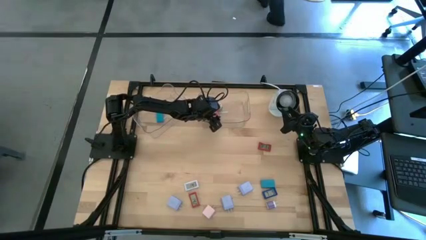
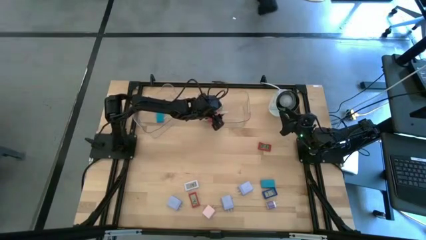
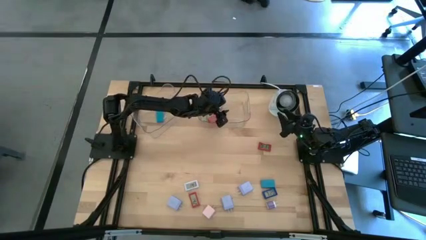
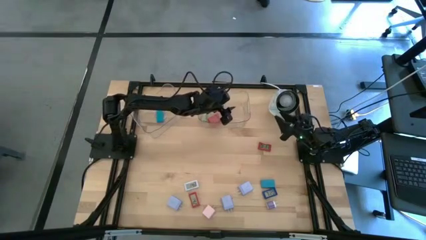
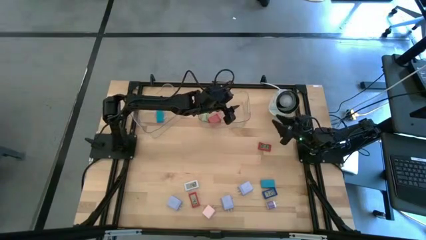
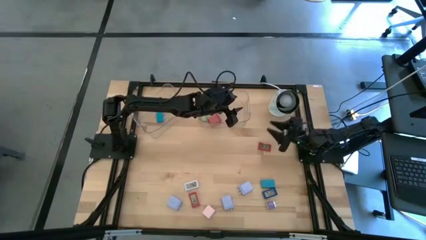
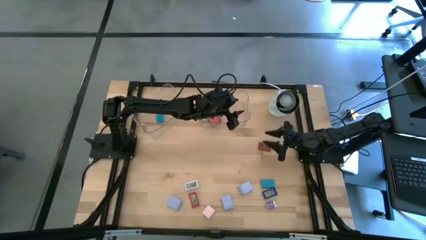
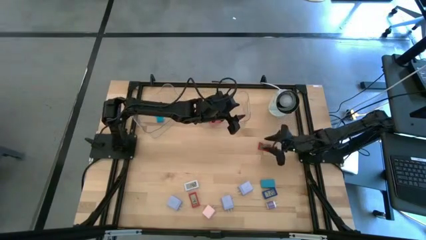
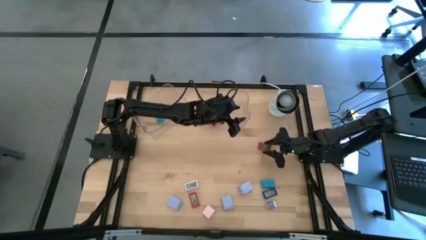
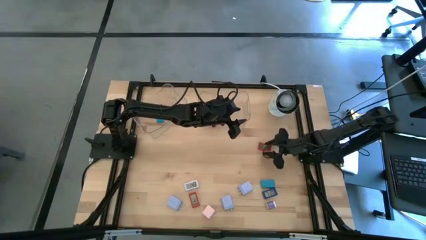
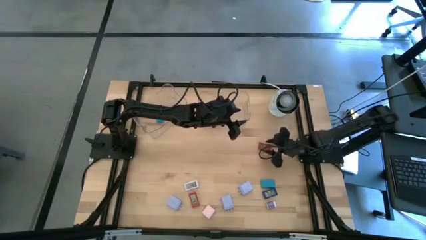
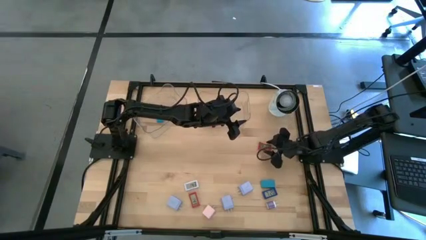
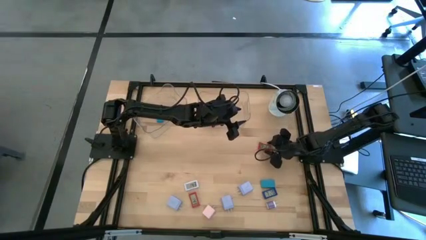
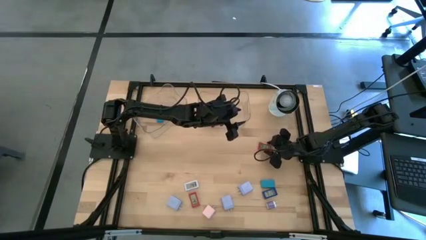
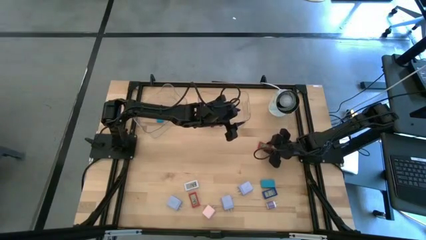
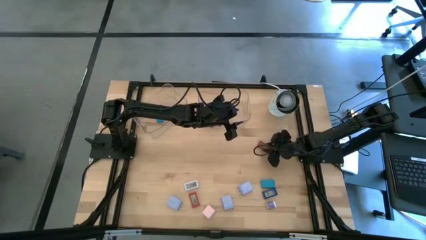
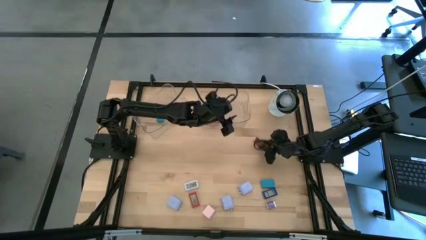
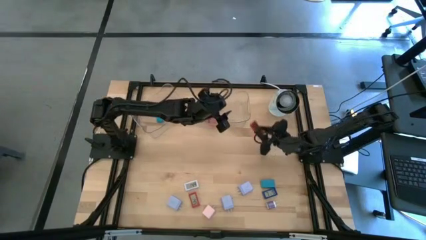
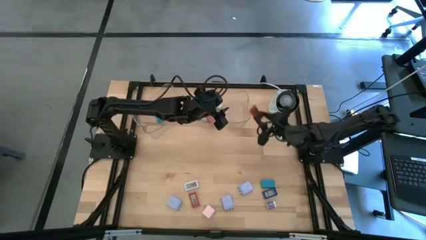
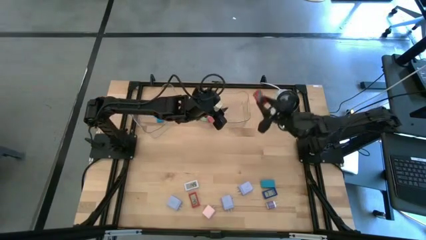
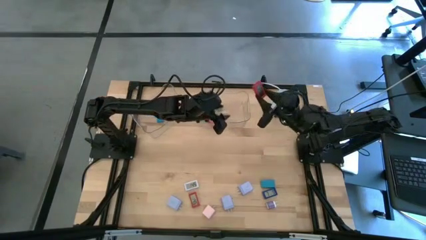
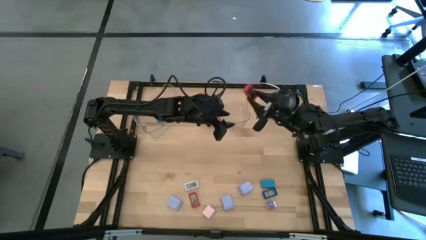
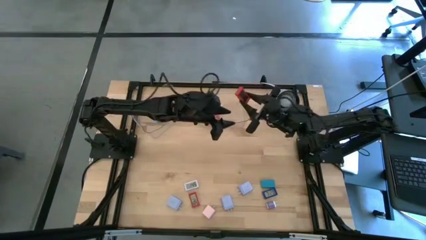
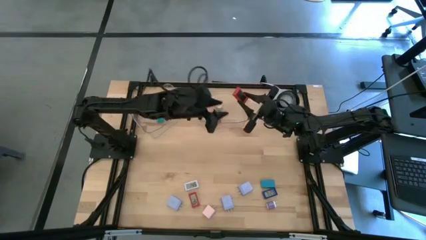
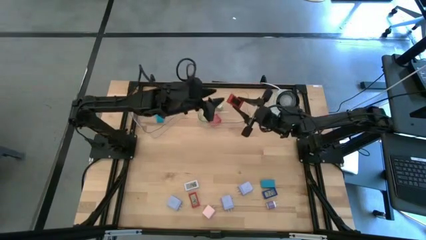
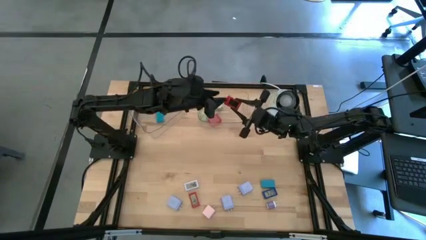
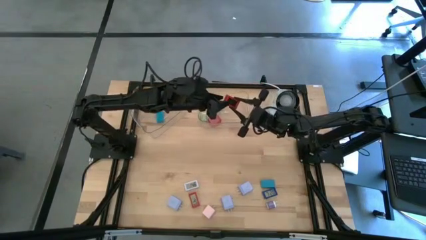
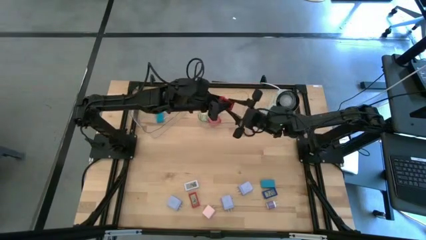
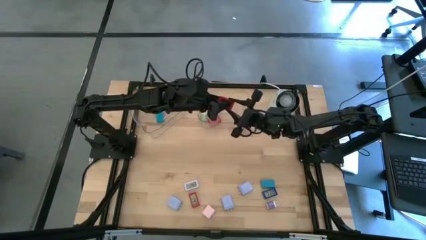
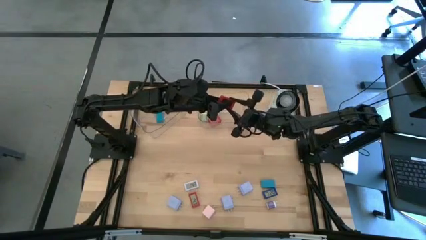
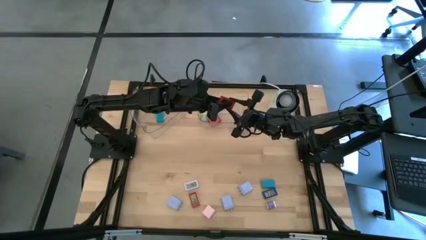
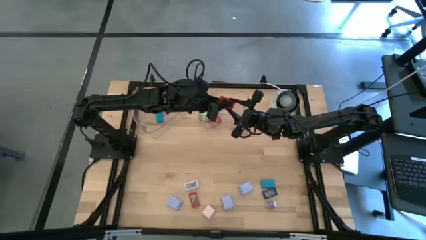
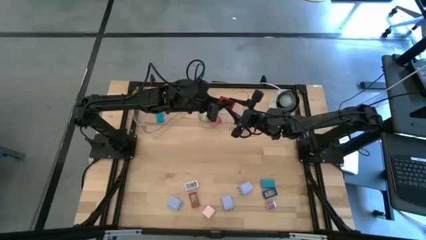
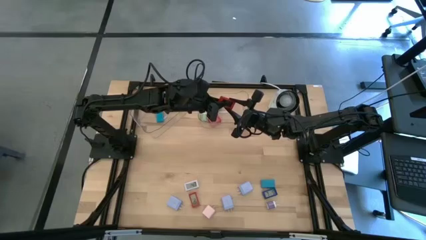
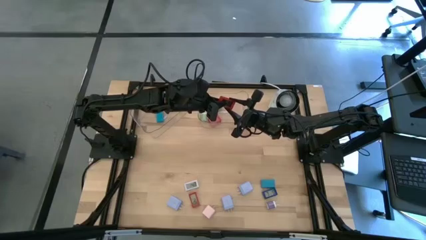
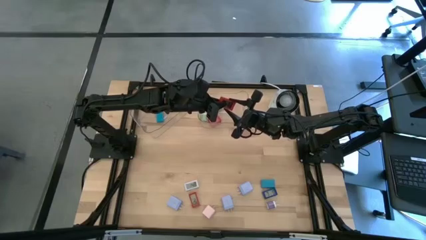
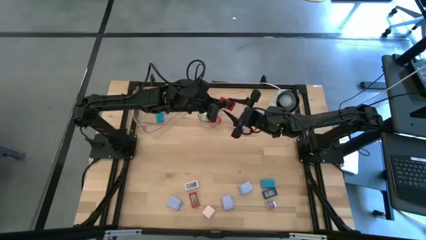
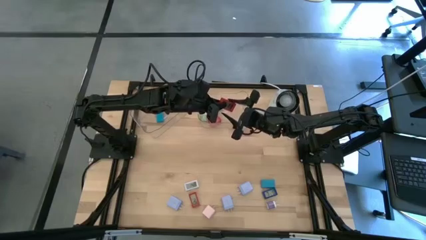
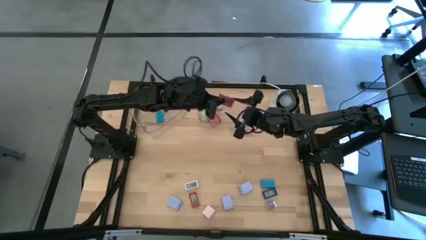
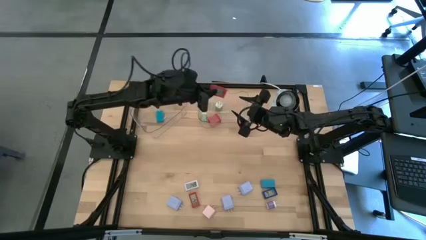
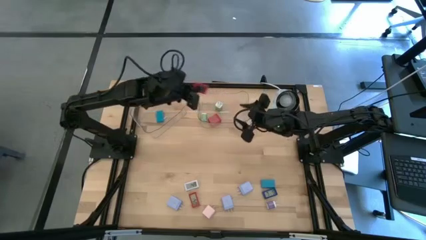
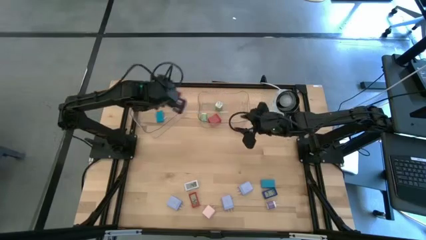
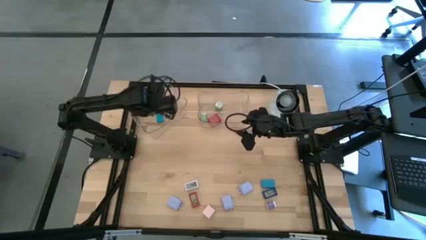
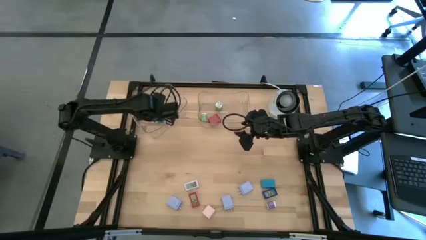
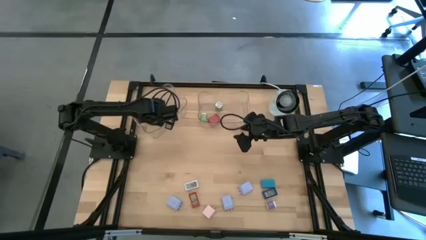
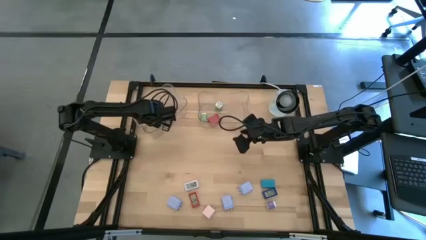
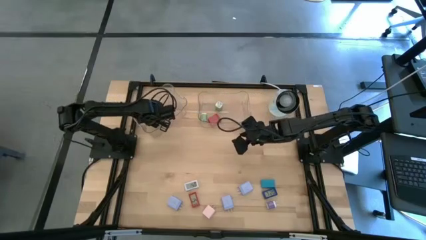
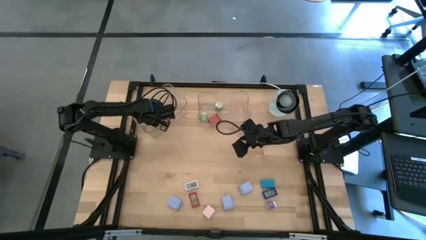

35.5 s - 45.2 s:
Task: Pick & Place Office items
Put the top red digital timer into the left transparent bin

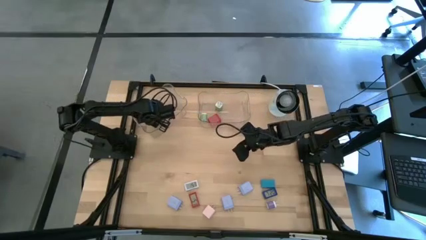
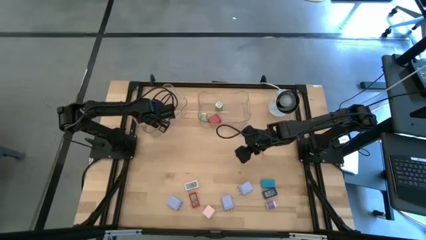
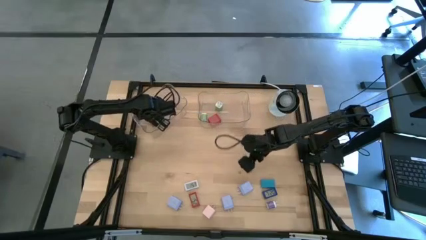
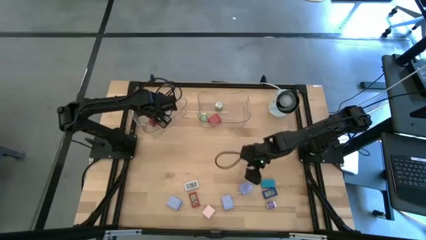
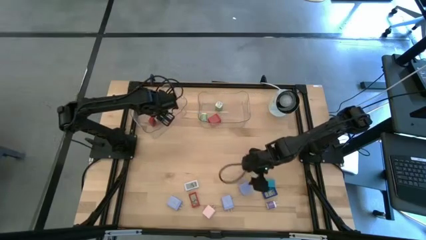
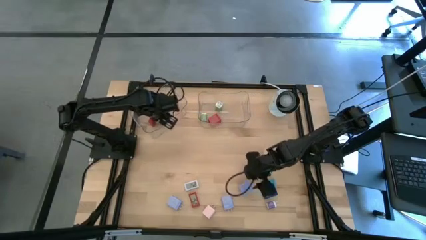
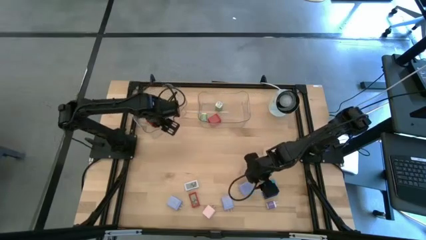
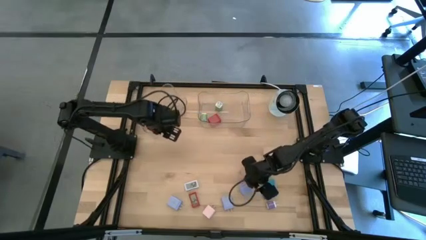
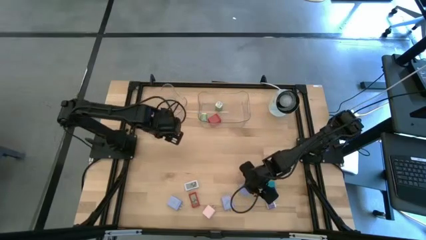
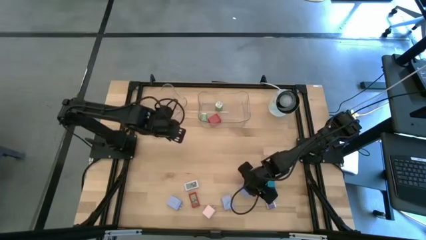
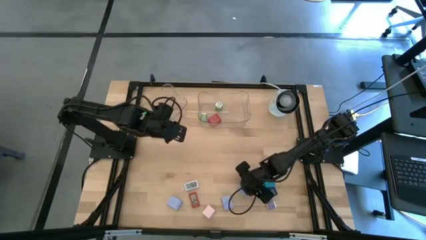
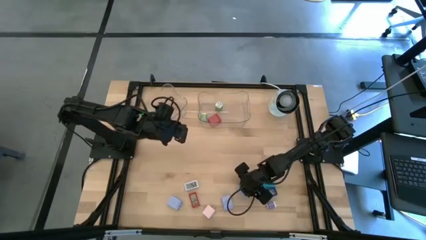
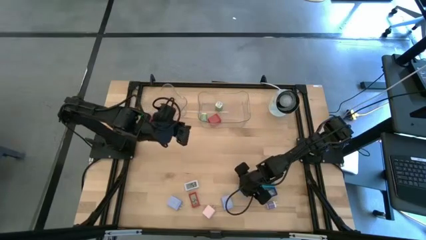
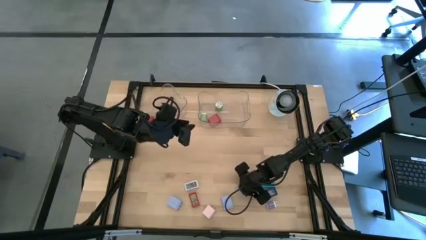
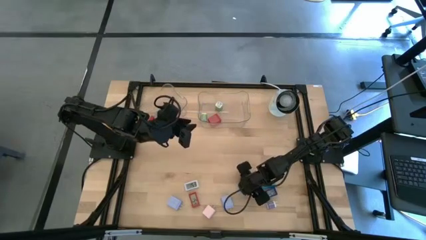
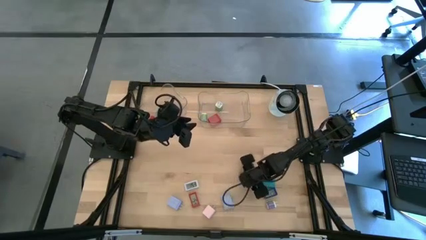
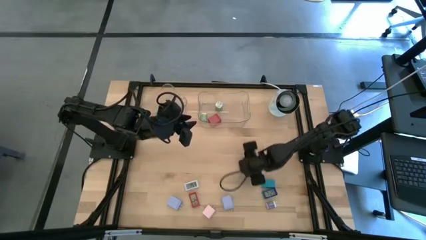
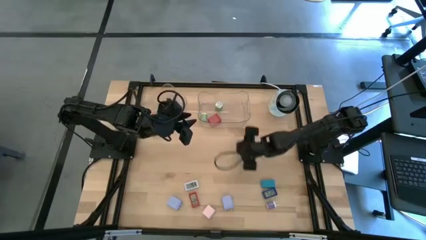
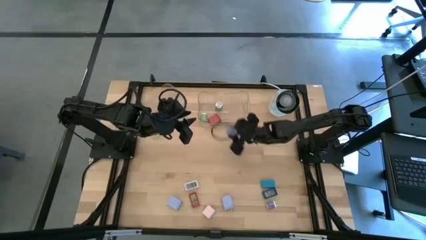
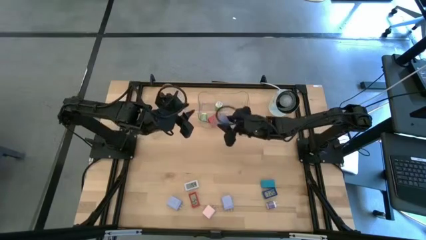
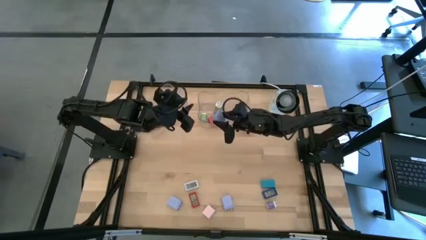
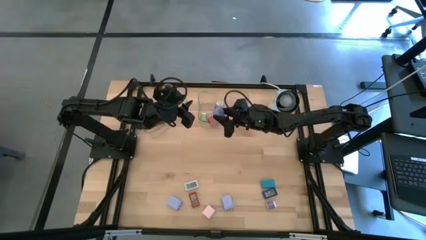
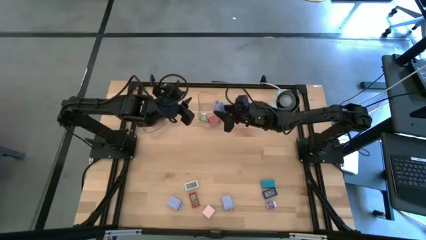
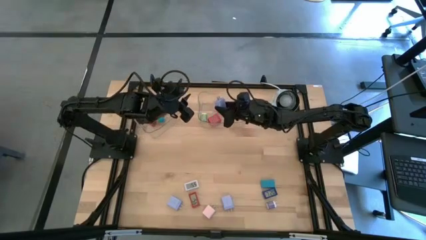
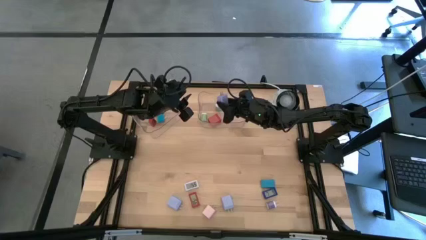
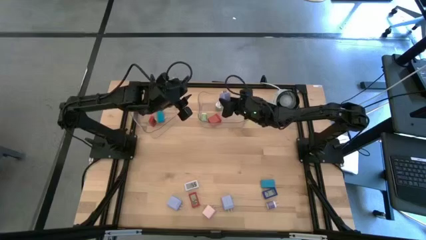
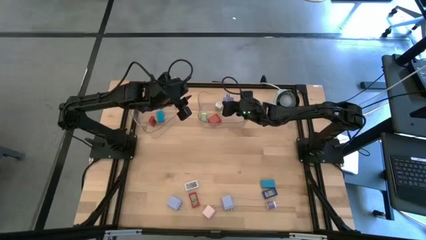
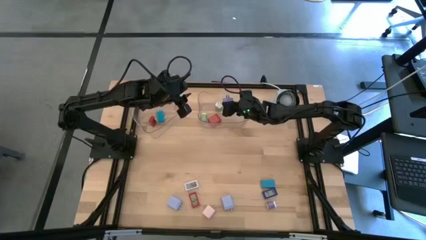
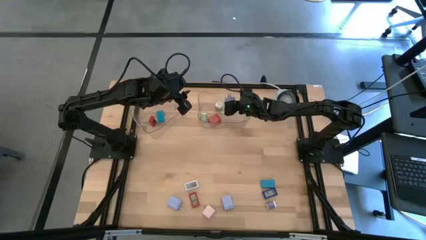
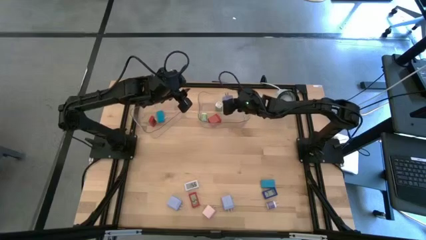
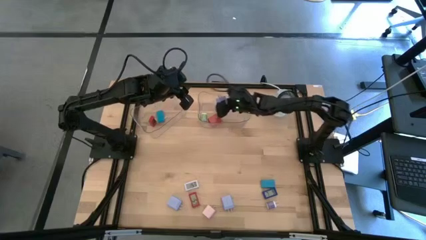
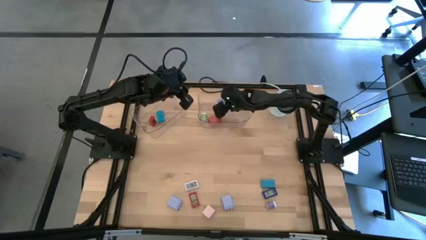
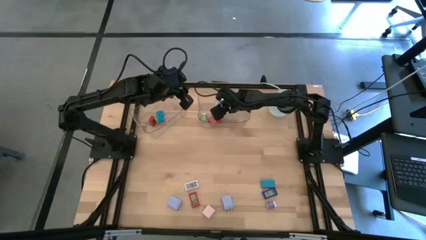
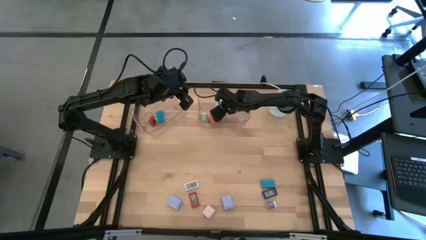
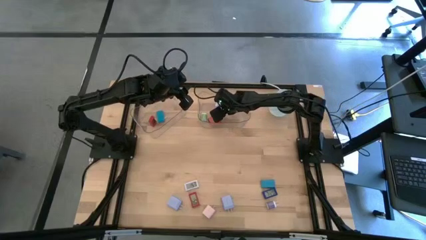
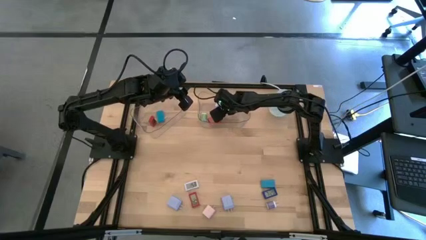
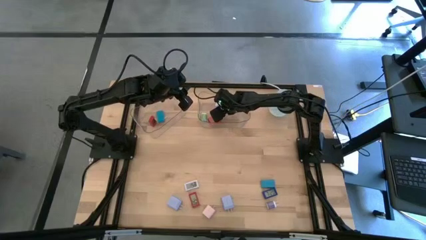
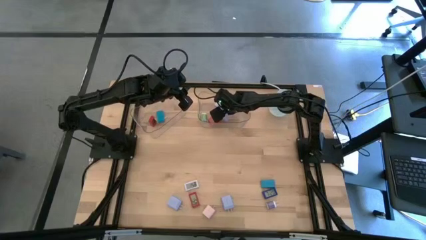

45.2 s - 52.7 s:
Put the top right blue charger adapter into the right transparent bin
